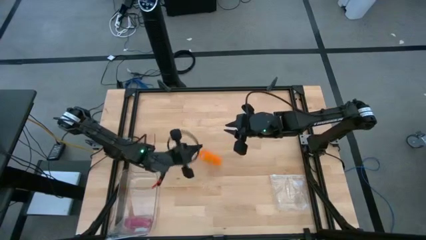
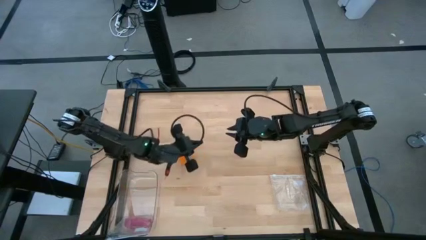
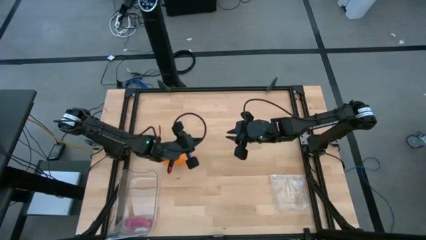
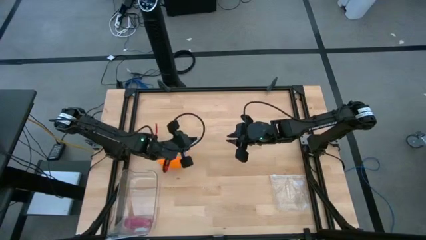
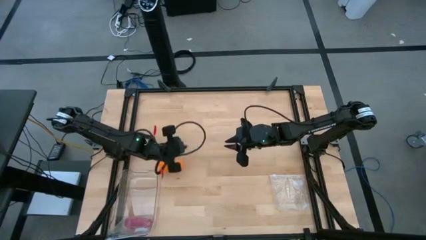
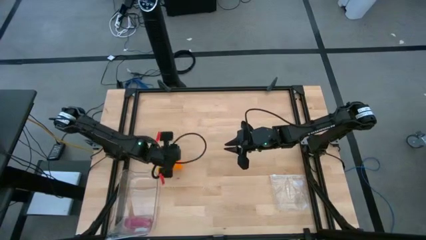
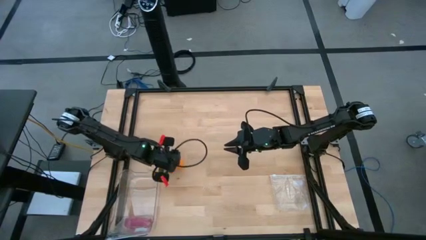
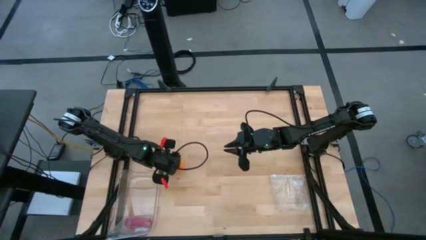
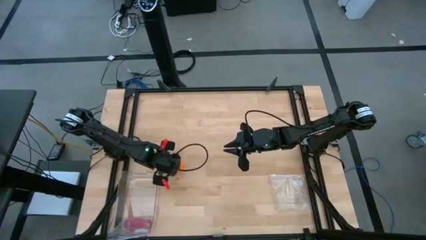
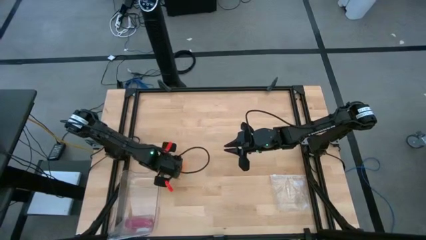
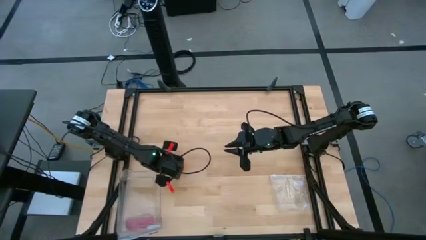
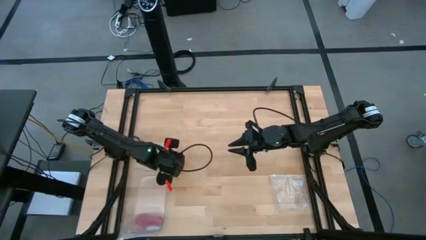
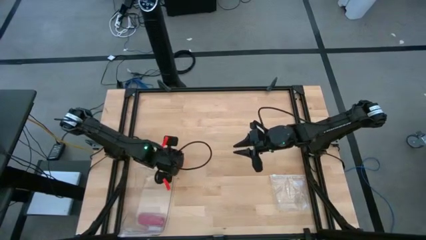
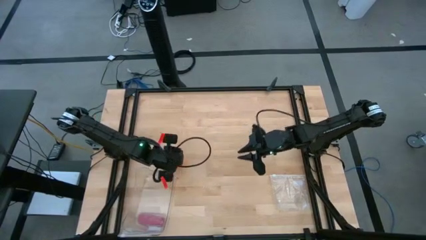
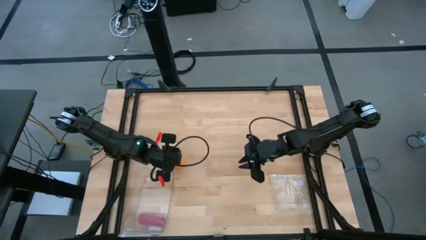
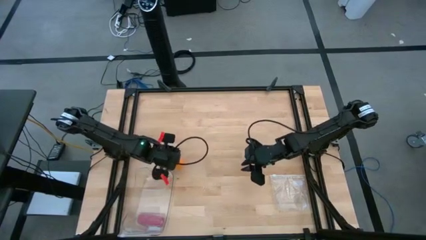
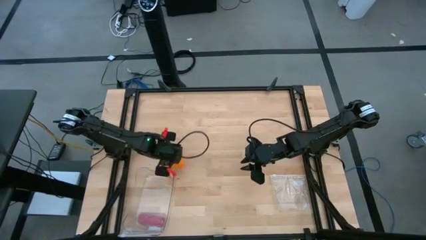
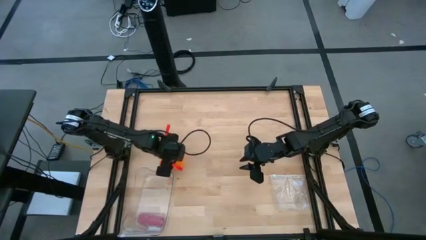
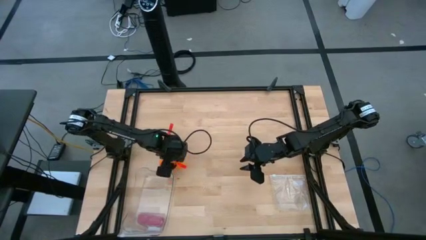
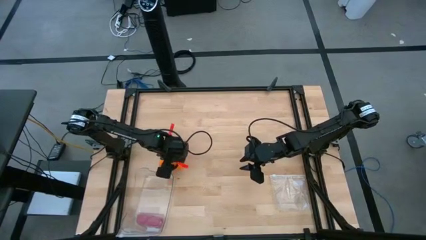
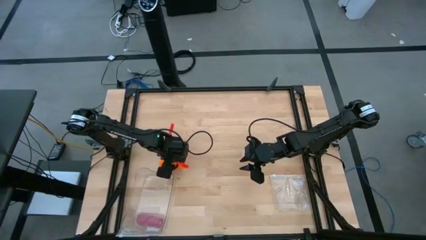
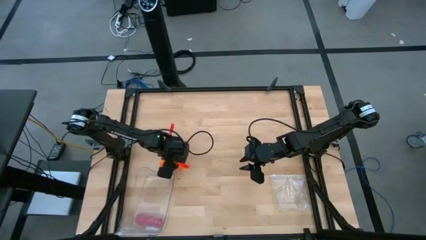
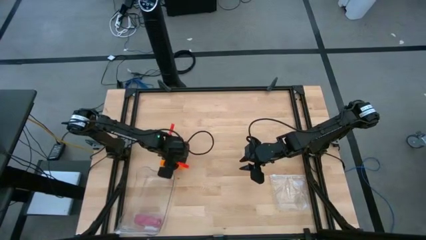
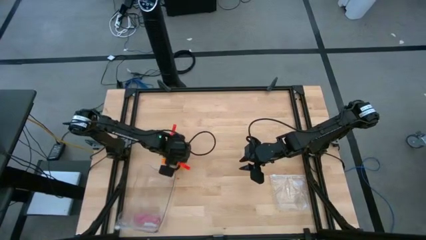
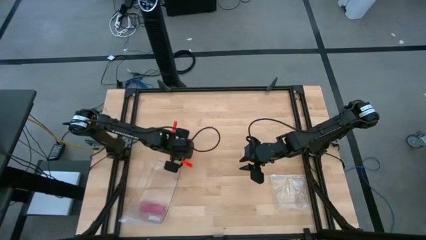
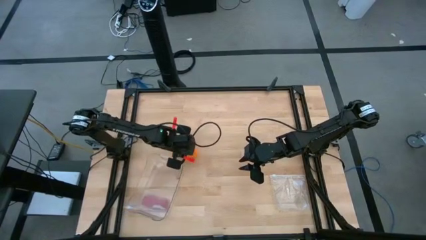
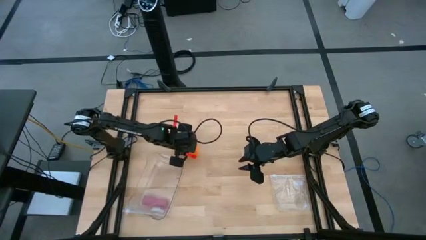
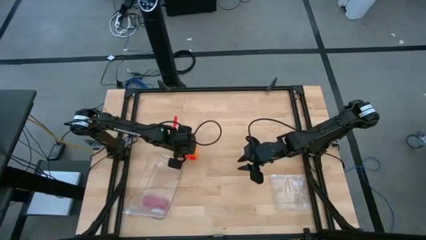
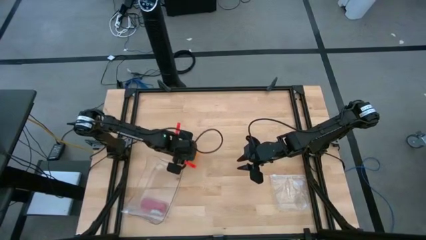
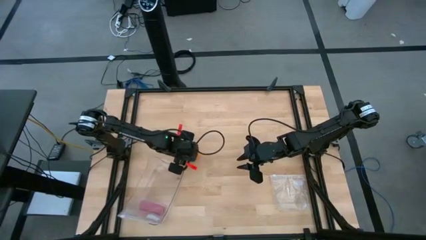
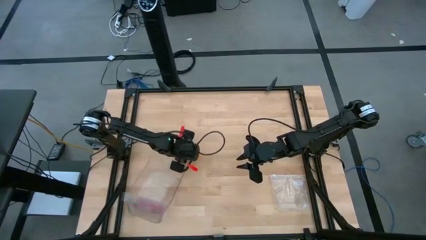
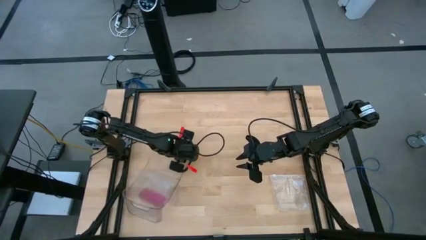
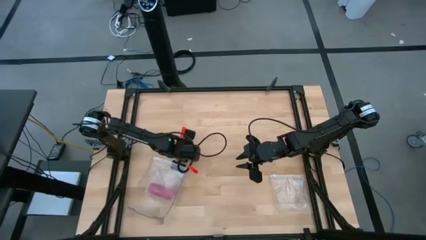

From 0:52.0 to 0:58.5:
Task: Roll bandage
Adjust the orange bandage

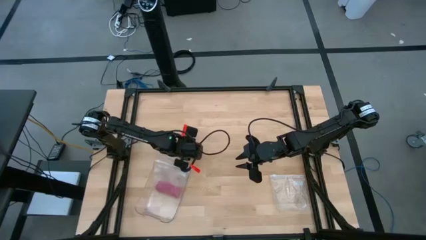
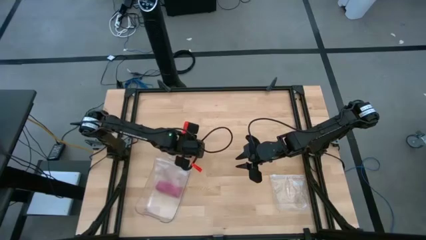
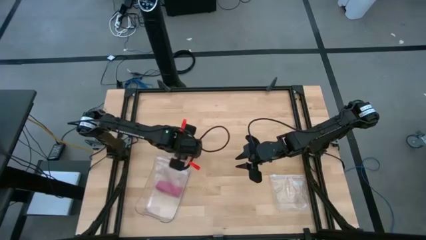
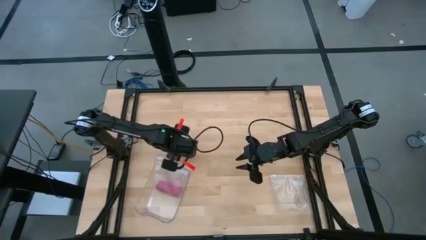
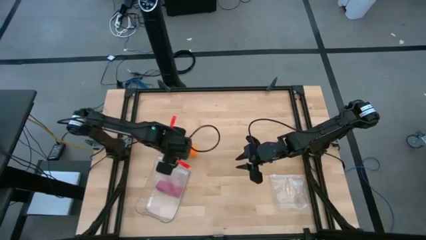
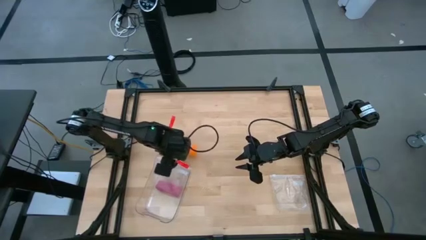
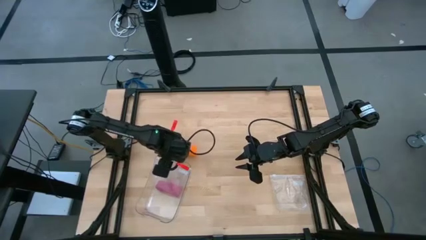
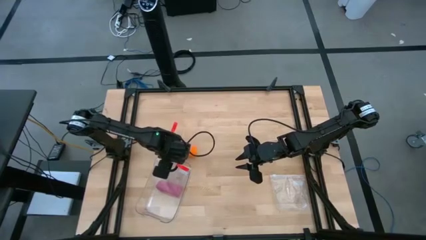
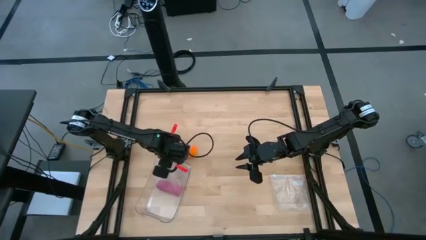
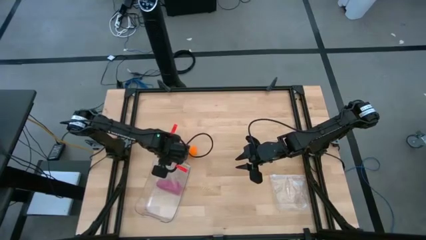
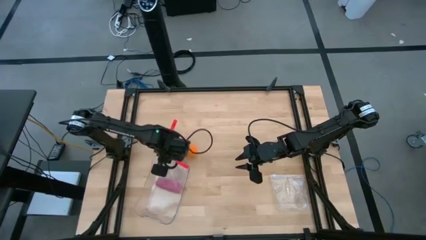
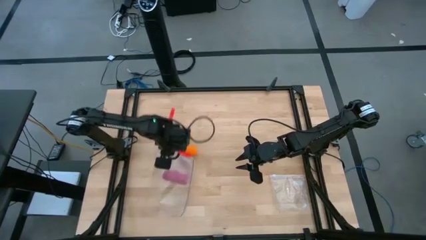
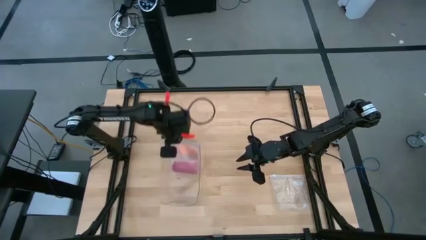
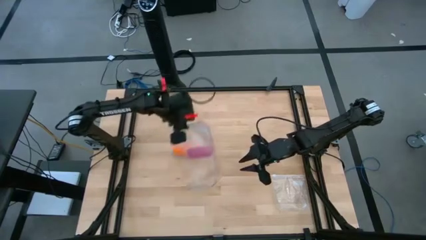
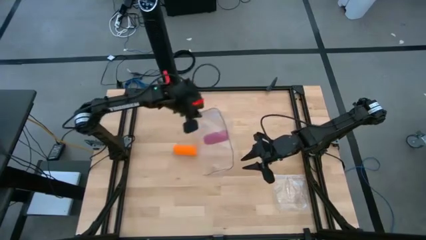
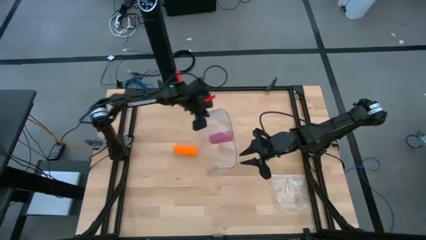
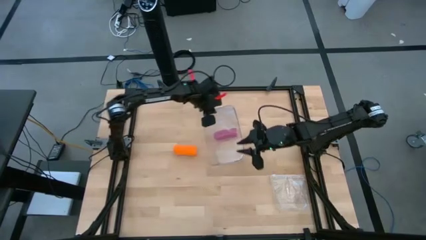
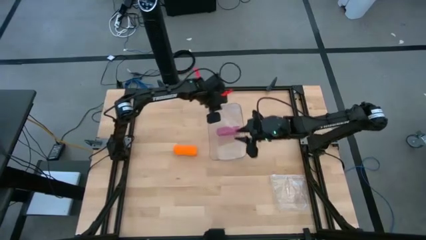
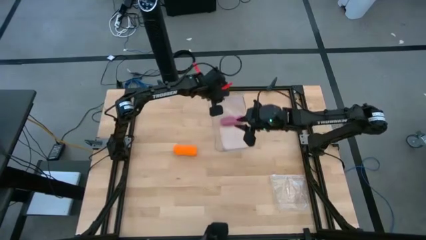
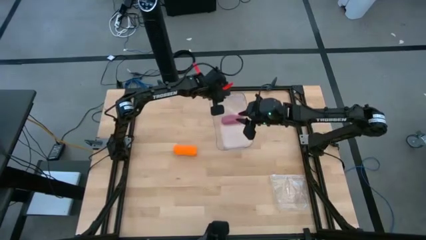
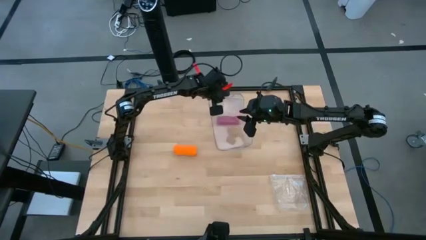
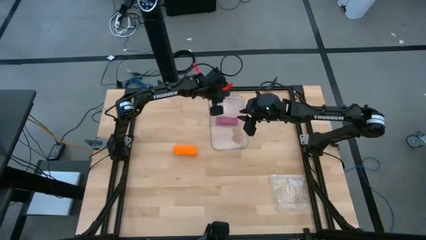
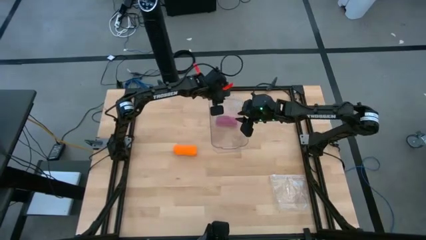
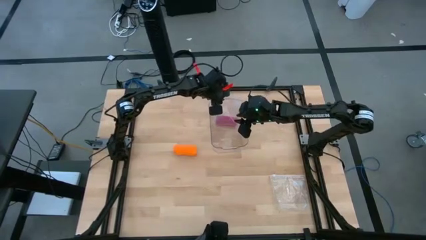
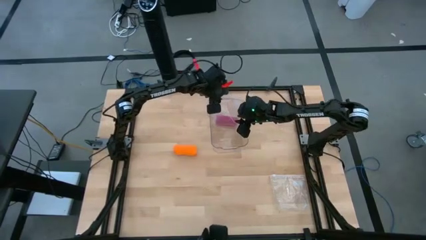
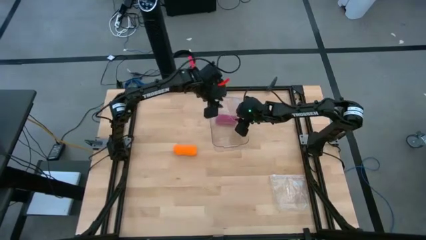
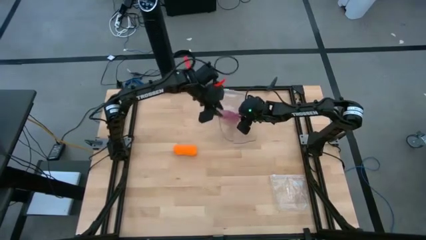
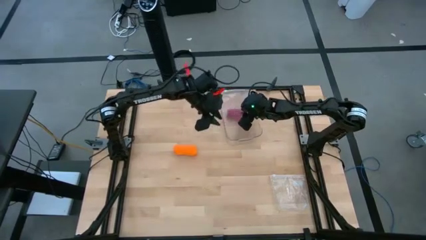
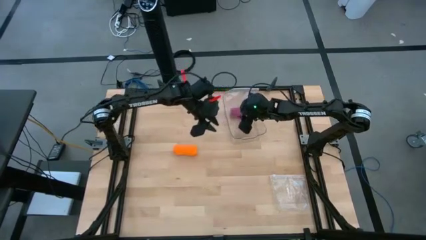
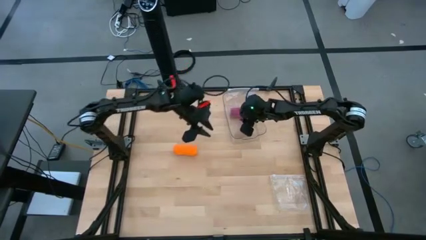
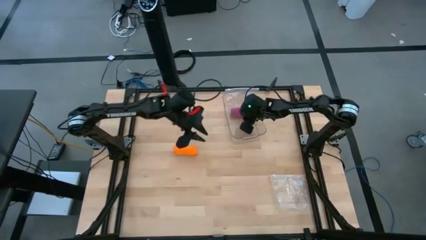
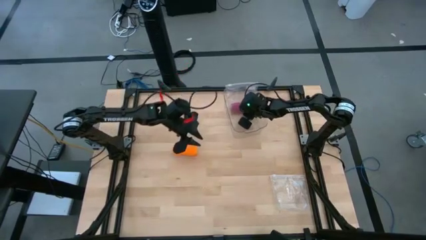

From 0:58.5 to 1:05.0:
Move the transparent bin to the top of the table
